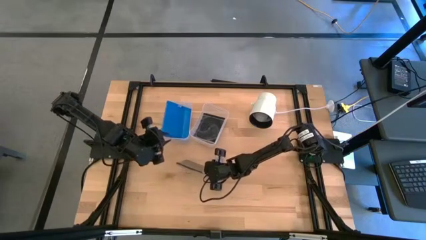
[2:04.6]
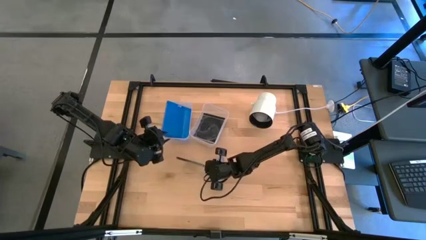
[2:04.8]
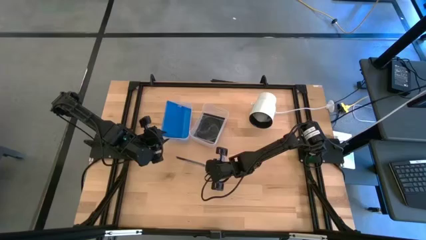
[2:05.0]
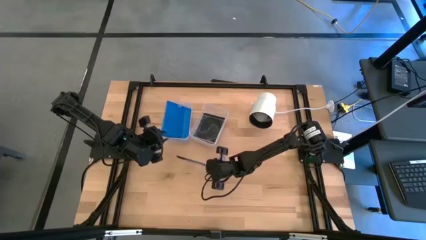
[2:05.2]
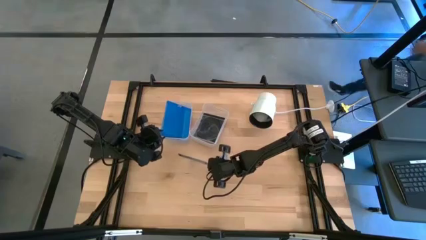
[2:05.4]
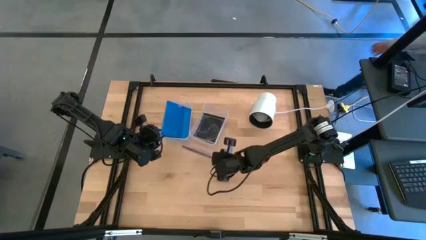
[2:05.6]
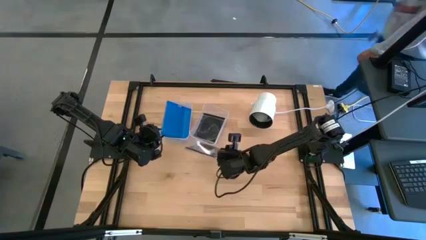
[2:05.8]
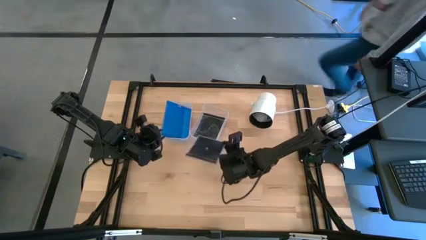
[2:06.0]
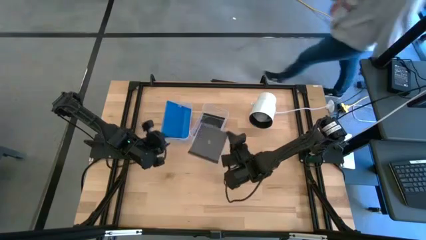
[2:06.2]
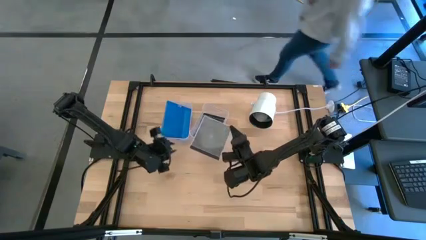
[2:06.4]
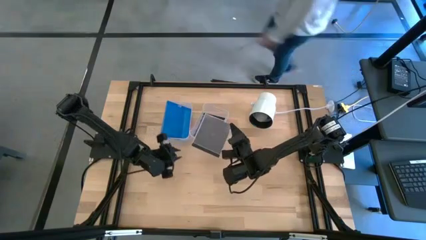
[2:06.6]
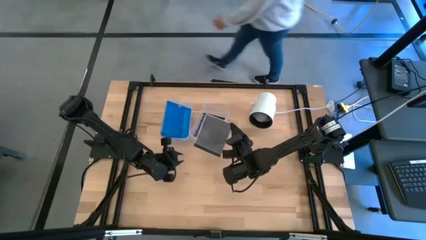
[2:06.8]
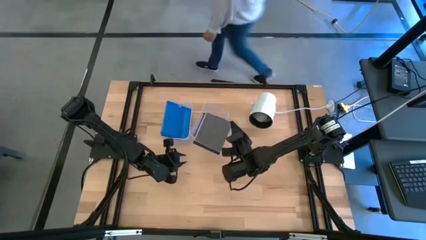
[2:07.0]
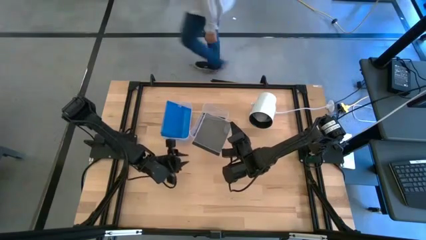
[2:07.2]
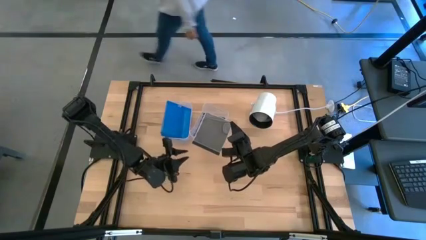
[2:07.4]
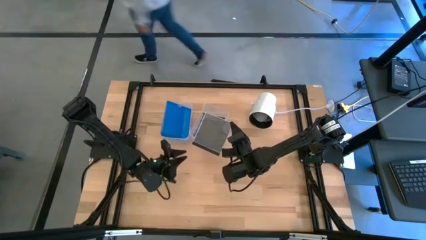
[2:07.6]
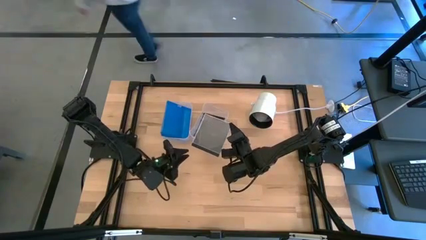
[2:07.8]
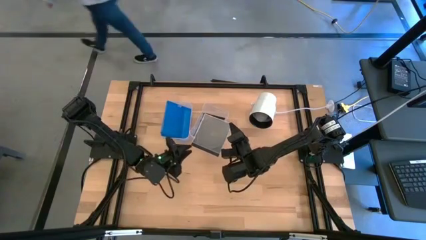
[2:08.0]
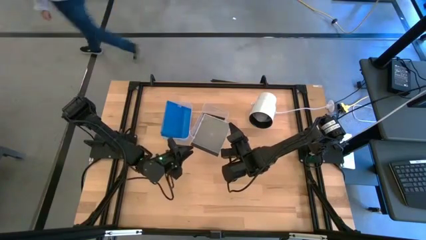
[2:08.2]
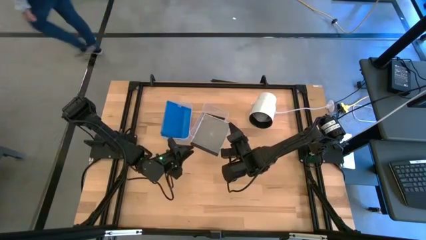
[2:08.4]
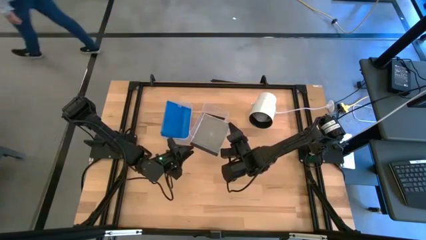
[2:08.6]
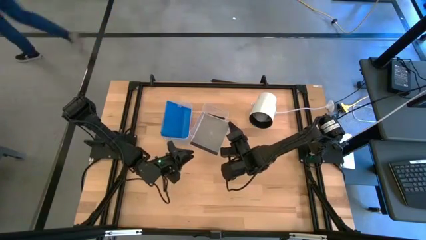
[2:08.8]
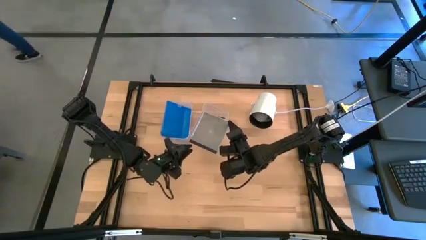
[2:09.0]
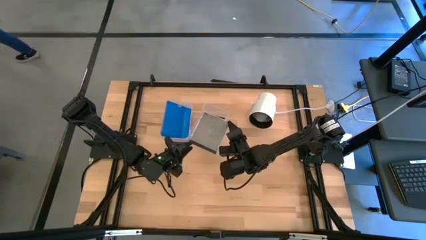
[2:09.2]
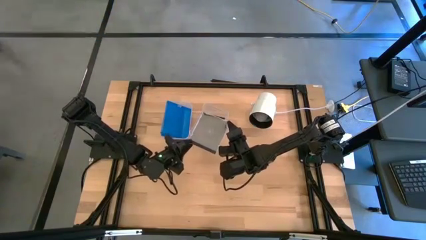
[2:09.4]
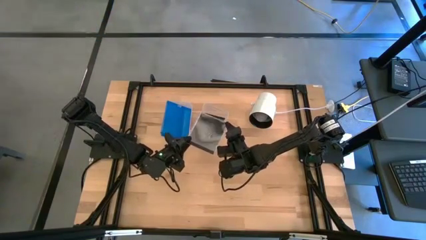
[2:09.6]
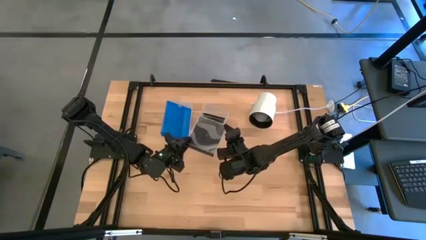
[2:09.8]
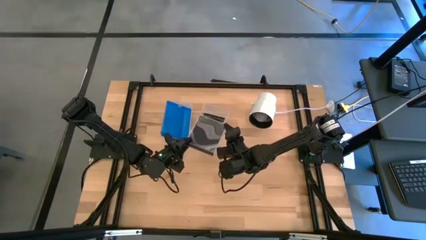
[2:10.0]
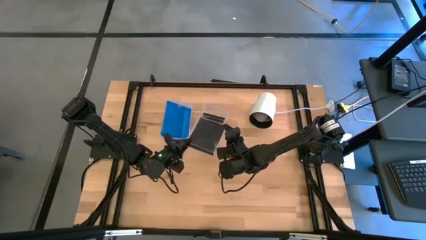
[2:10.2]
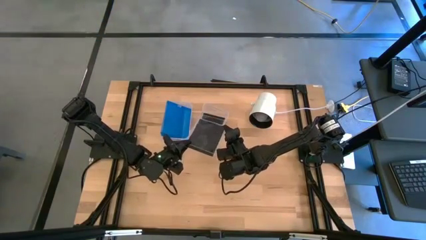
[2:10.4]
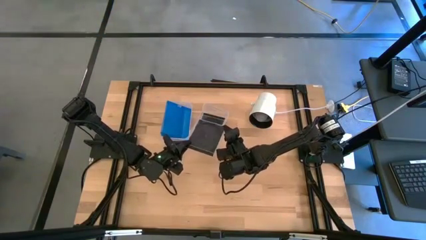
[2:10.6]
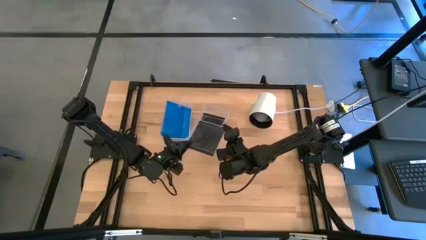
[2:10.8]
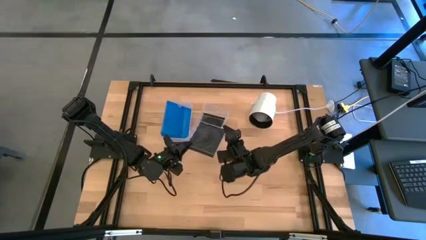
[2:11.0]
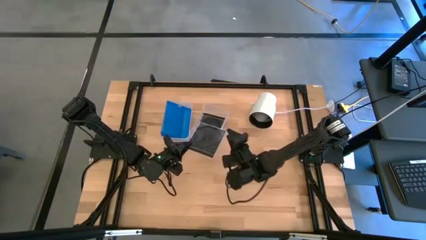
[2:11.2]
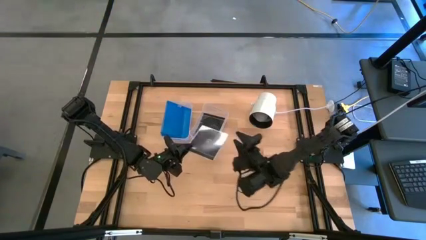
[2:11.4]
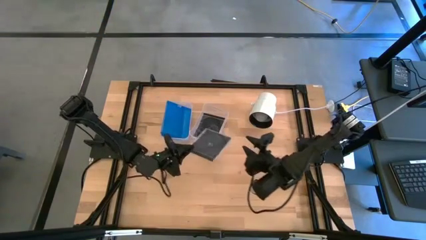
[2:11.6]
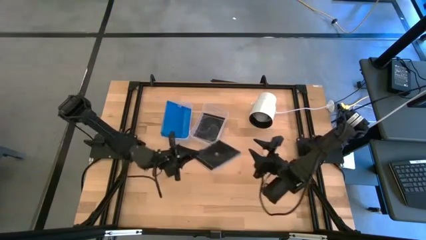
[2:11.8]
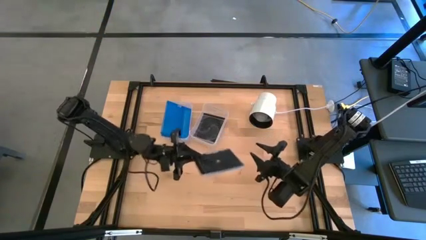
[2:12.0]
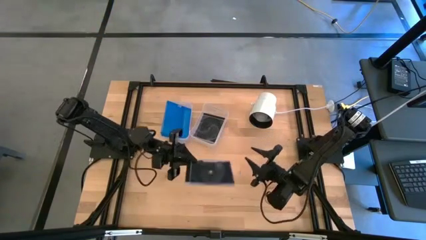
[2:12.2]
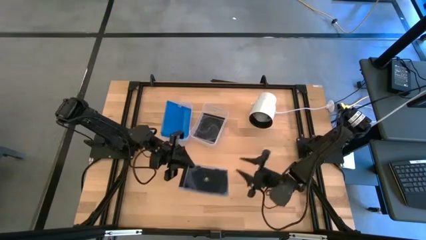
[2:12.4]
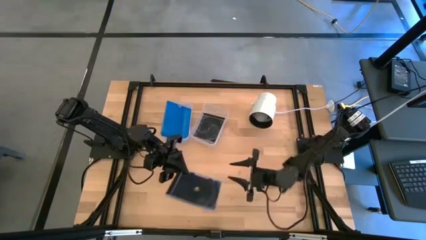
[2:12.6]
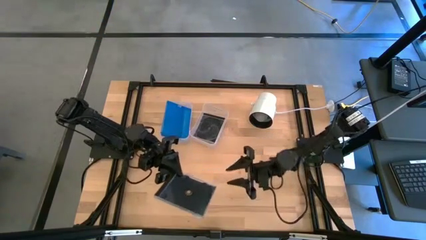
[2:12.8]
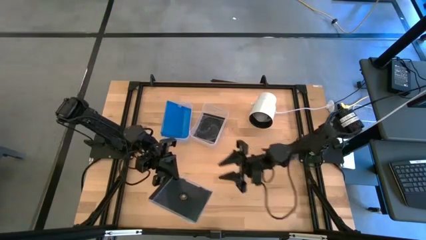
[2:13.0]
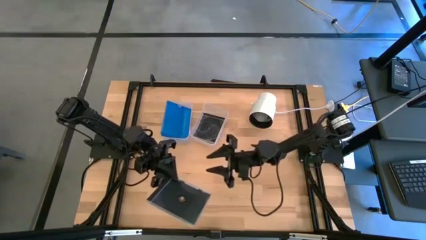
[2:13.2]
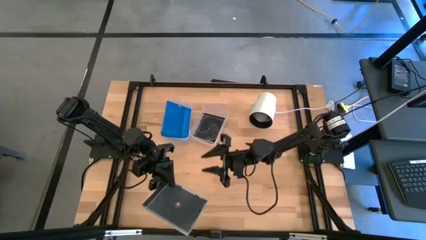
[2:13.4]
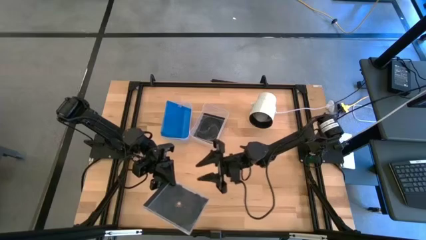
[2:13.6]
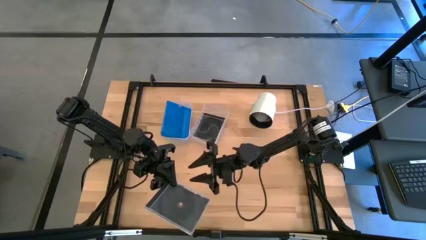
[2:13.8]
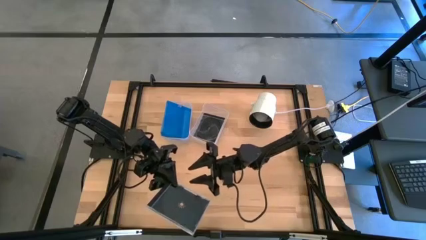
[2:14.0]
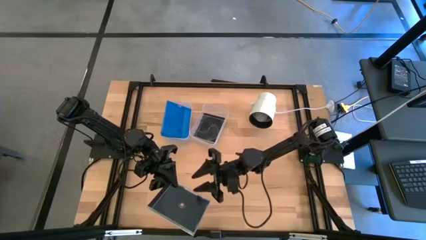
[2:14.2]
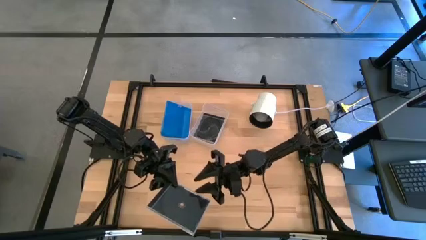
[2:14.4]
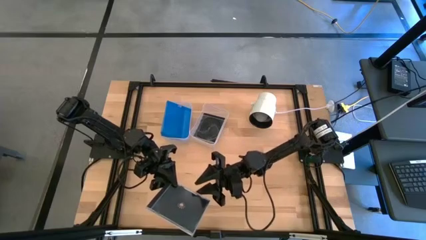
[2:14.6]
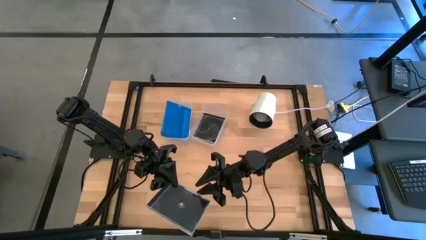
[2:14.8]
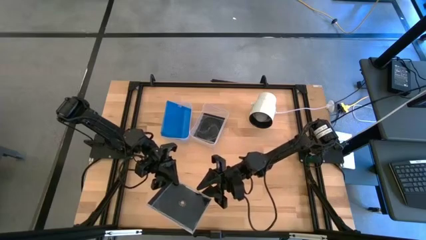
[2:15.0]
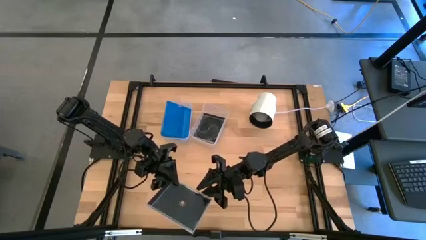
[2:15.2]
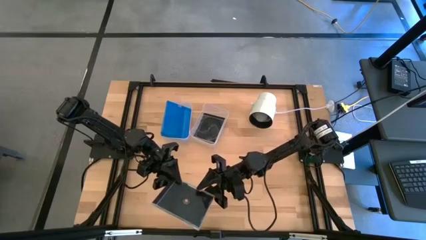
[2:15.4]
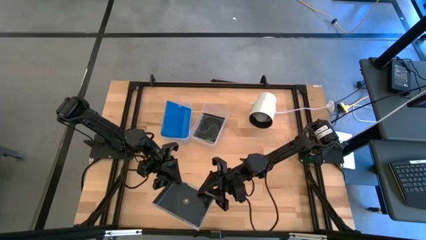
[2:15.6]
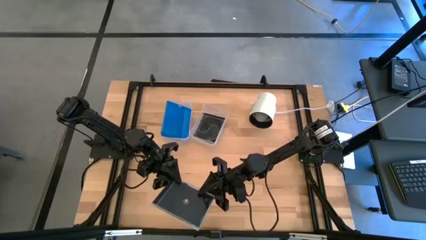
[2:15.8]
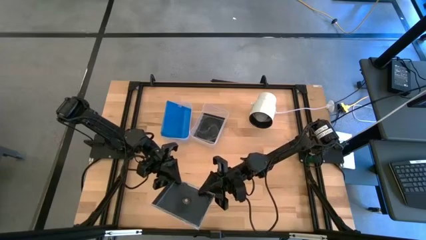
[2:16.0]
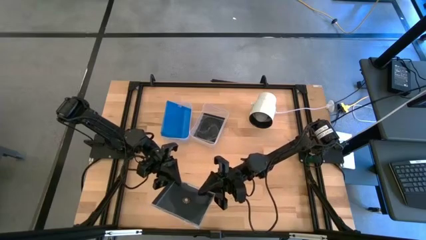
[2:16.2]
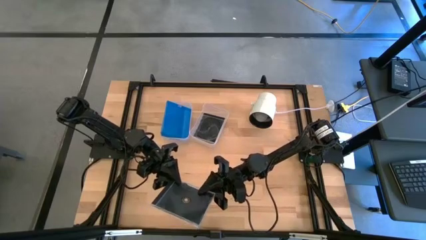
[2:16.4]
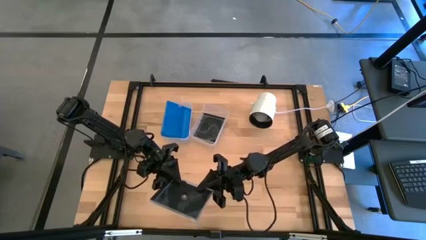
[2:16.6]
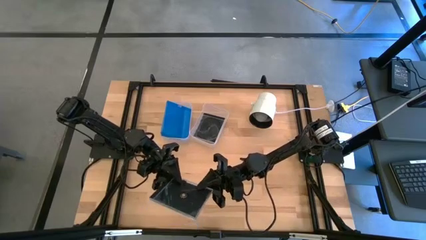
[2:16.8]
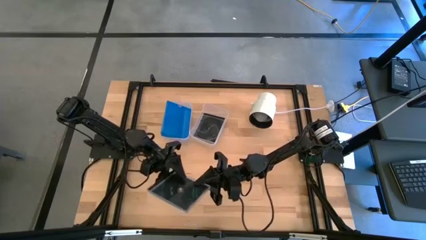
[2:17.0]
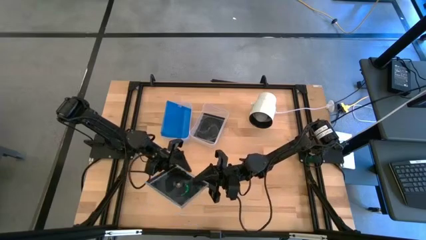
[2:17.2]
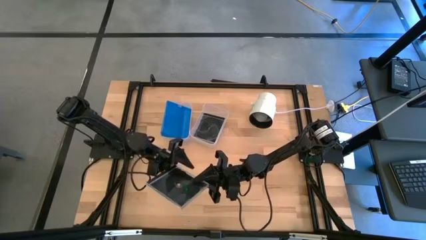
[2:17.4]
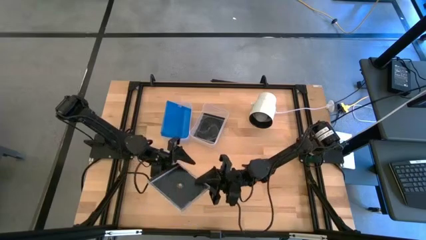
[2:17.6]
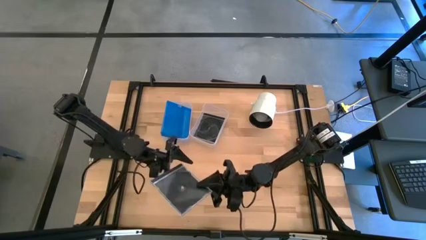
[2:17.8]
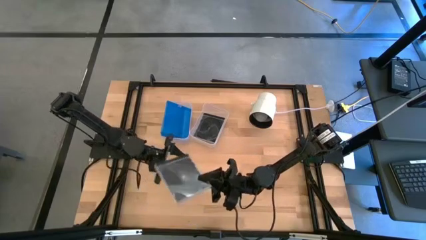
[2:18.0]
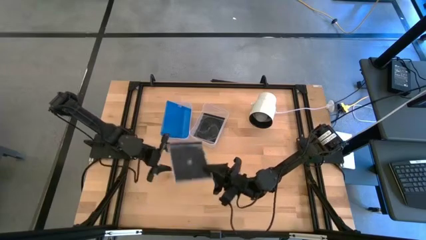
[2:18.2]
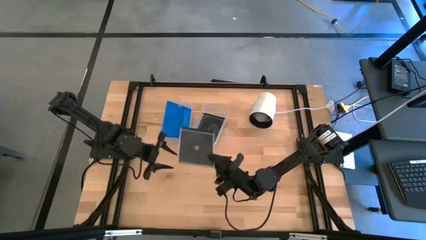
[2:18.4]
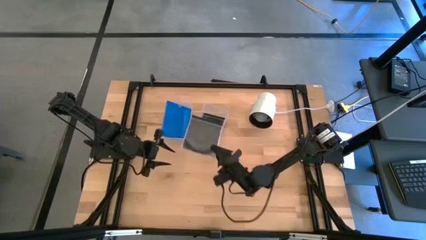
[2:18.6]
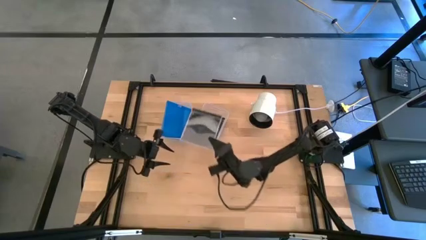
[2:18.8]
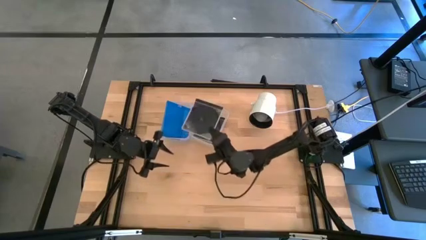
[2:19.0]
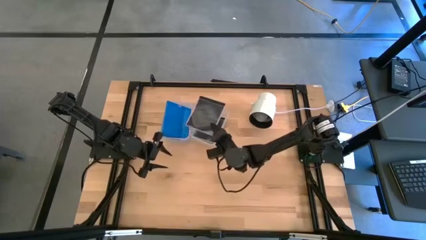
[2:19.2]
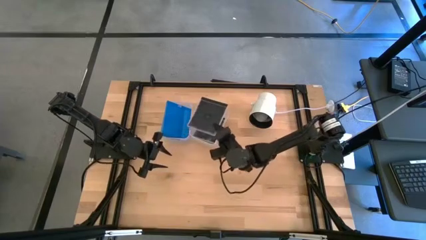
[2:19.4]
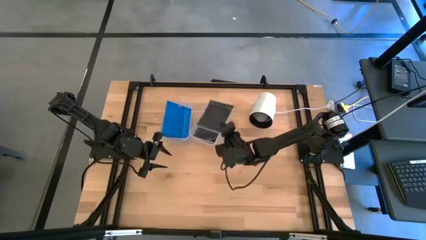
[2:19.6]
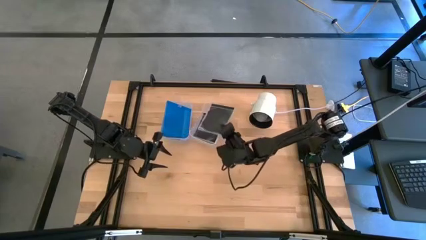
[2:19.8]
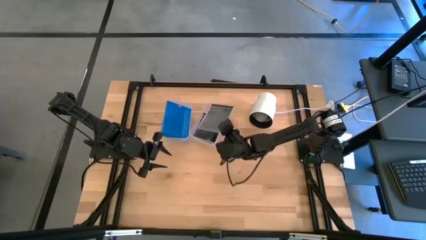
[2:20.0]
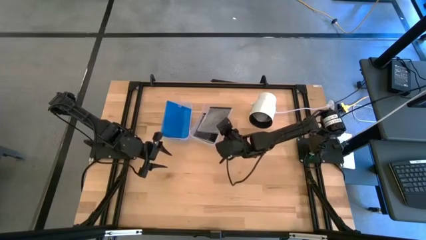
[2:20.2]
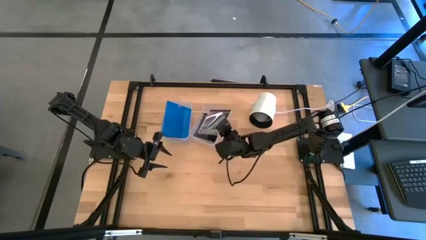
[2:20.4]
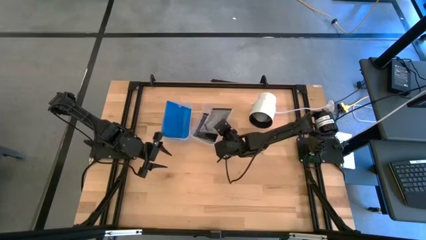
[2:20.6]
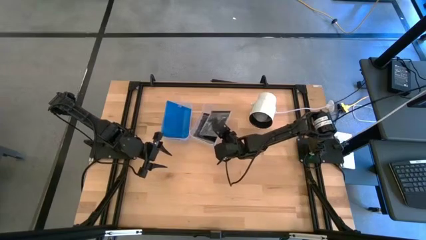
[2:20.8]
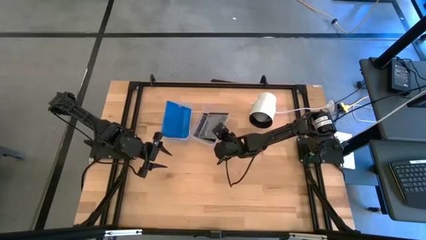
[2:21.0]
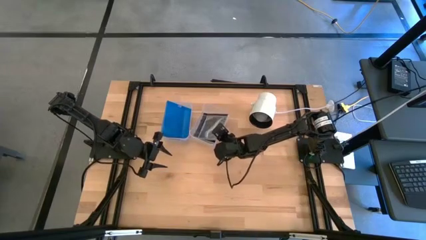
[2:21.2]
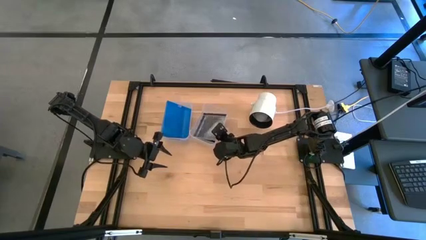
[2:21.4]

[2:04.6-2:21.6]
Task: Pick & place jewel cases by type
Put the black cd case into the right transparent bin
